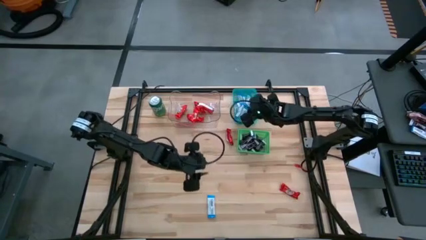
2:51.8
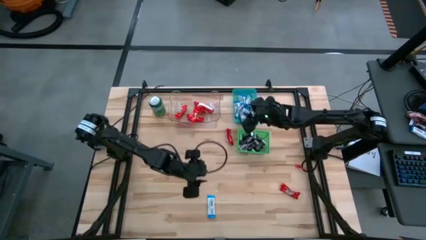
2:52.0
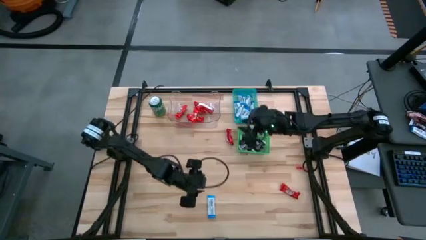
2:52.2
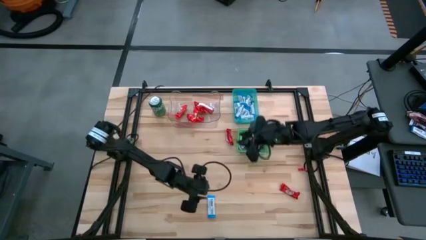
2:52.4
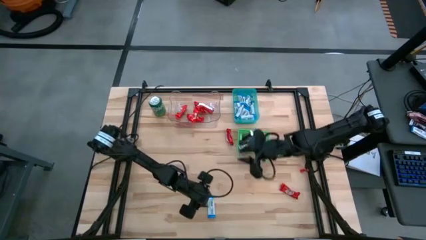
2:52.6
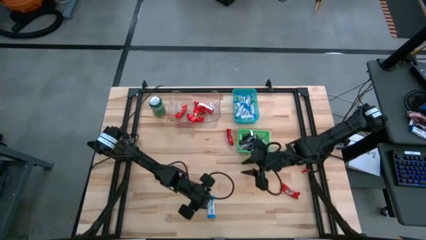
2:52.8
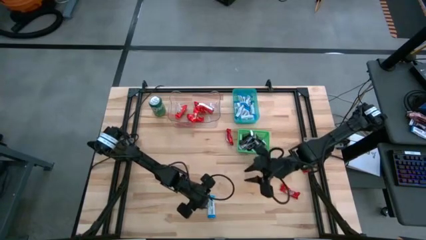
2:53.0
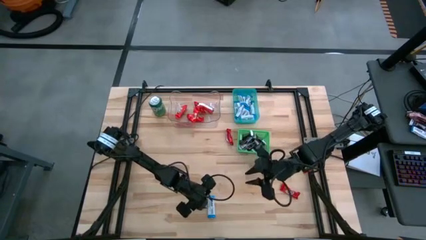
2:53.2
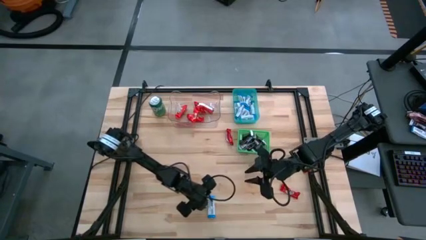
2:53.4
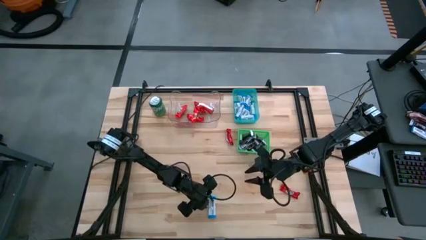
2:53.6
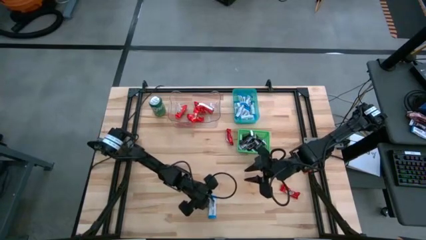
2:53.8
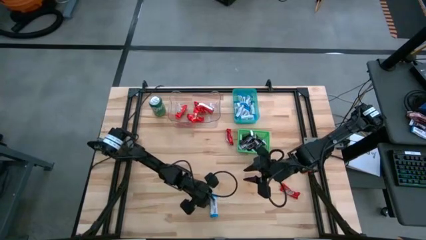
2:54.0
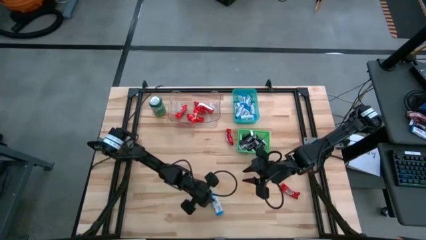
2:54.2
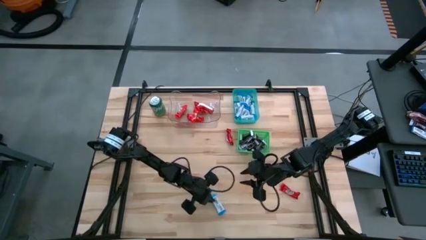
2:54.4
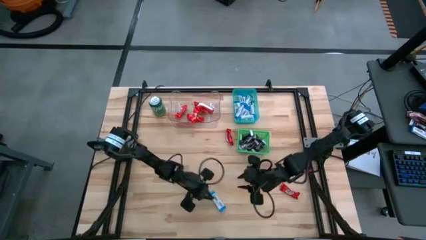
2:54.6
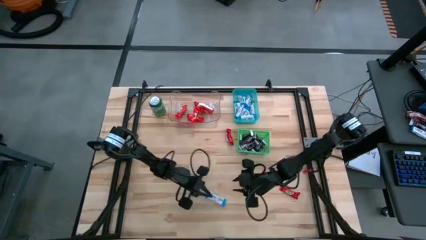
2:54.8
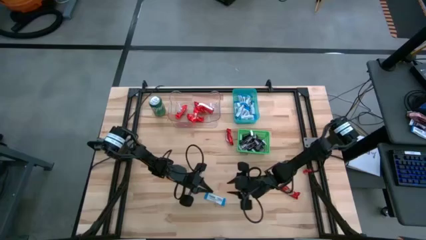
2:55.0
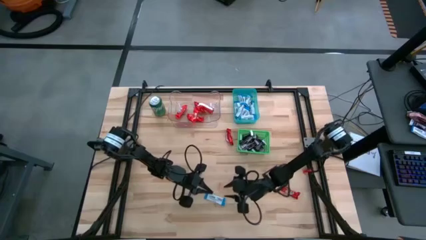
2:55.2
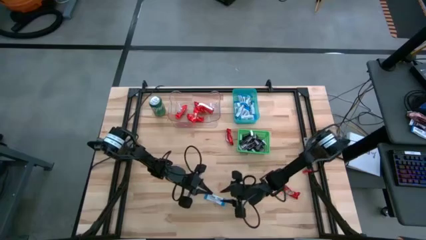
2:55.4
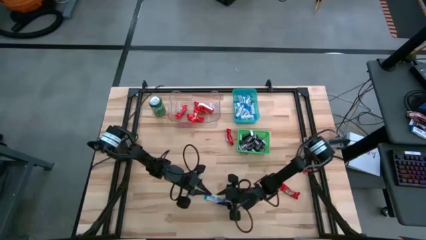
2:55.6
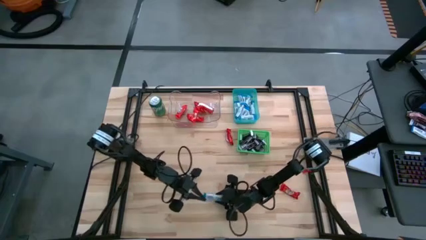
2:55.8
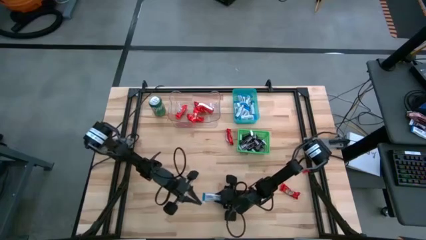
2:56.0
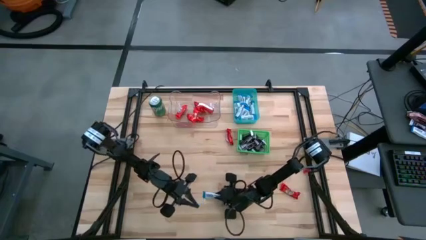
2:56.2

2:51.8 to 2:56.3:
Task: Sort candy
Put the white chocolate bar into the blue bin

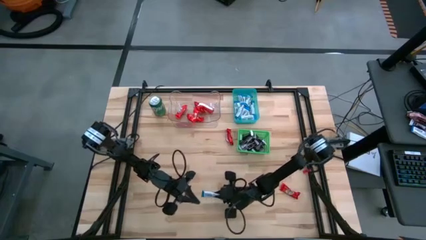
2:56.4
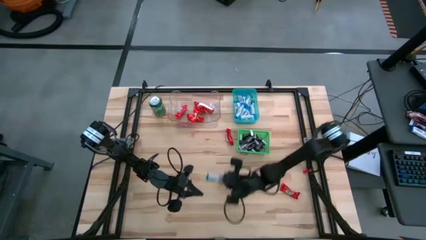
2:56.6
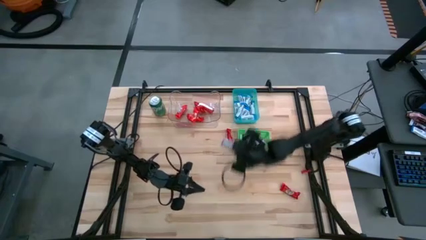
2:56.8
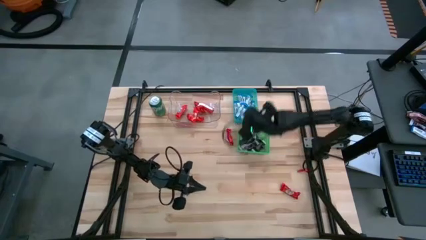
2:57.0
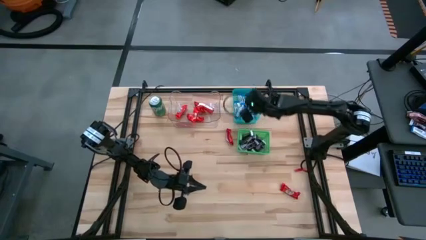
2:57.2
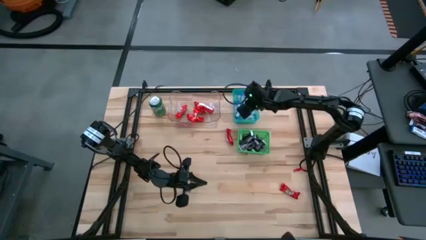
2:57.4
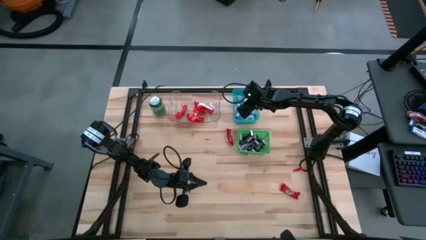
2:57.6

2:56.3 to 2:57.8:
Put the white chocolate bar into the blue bin

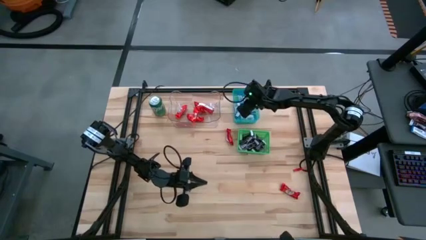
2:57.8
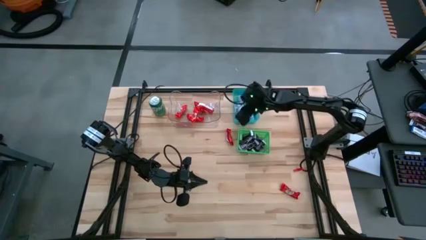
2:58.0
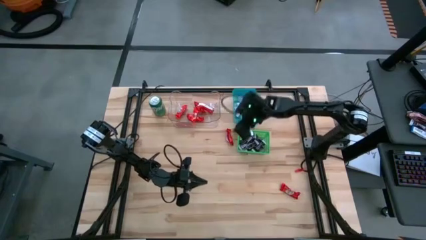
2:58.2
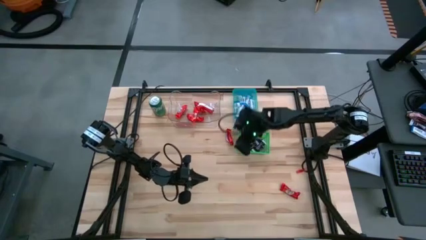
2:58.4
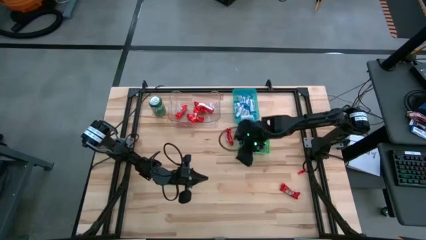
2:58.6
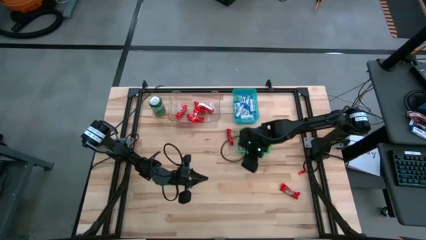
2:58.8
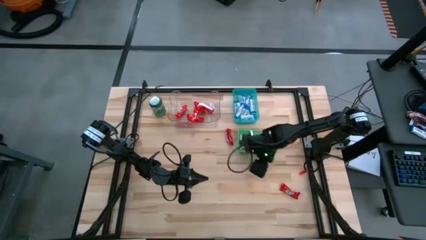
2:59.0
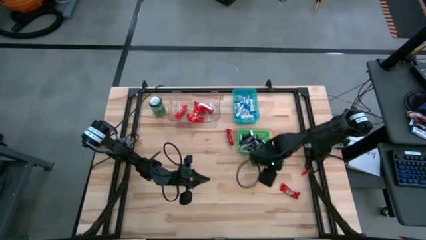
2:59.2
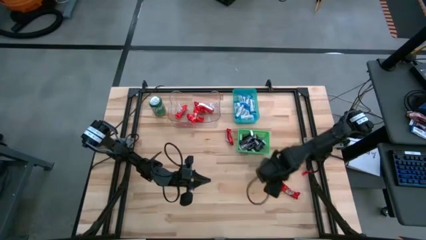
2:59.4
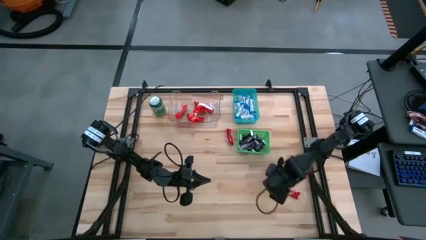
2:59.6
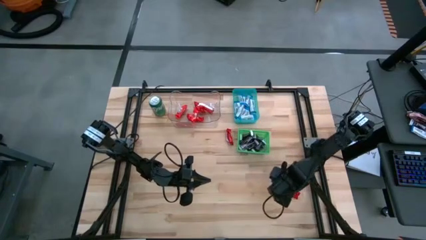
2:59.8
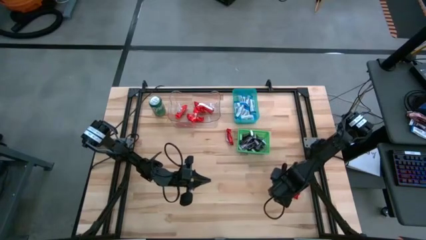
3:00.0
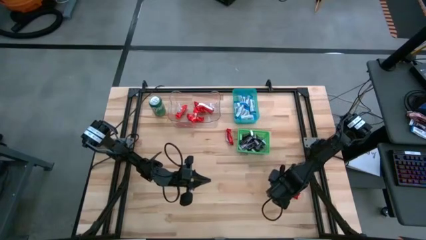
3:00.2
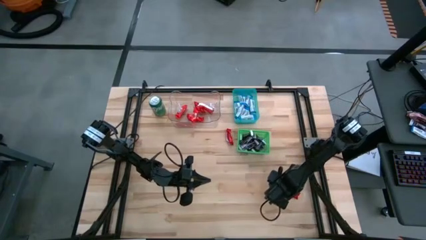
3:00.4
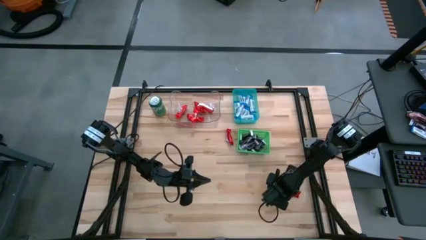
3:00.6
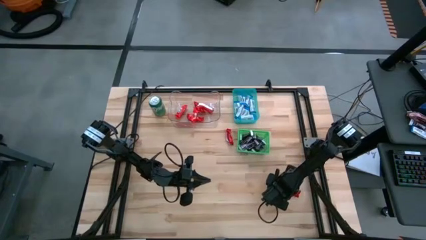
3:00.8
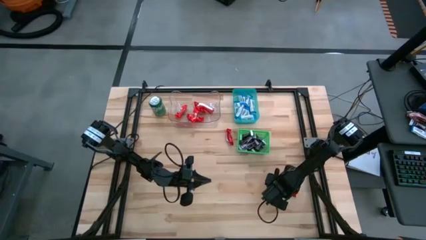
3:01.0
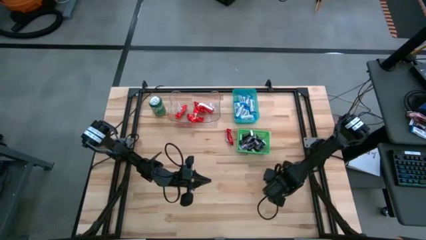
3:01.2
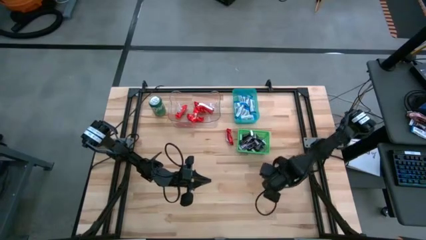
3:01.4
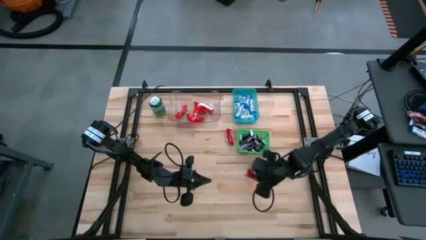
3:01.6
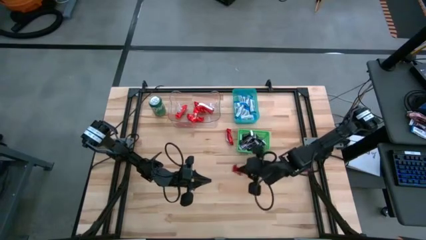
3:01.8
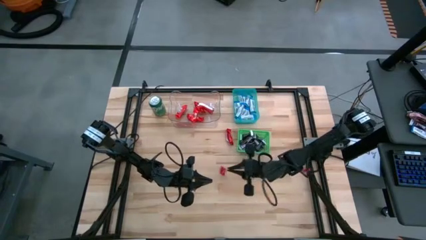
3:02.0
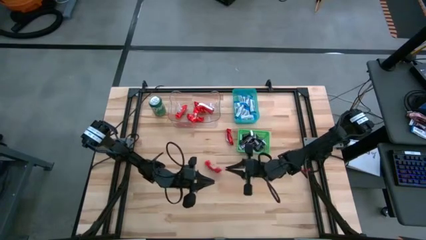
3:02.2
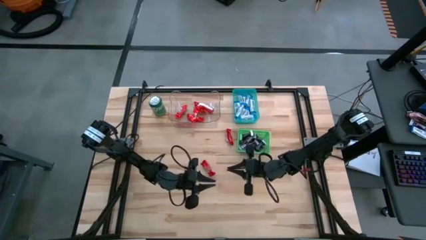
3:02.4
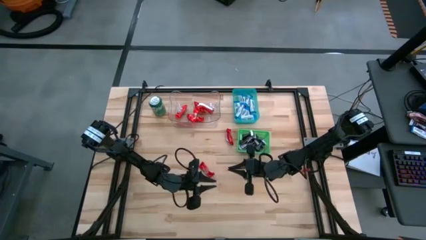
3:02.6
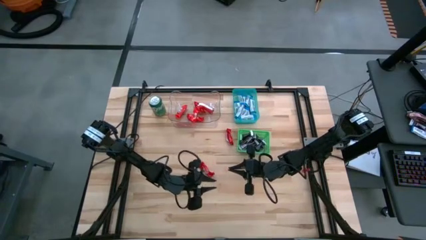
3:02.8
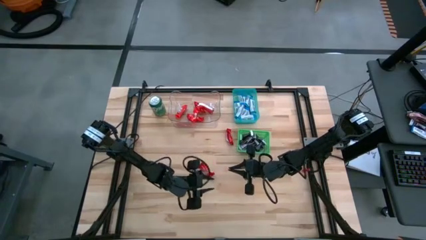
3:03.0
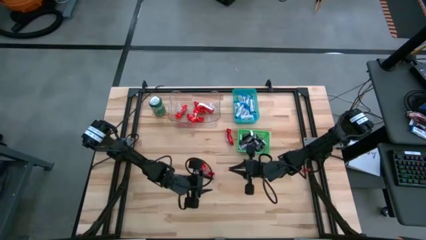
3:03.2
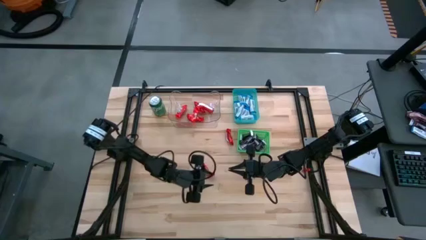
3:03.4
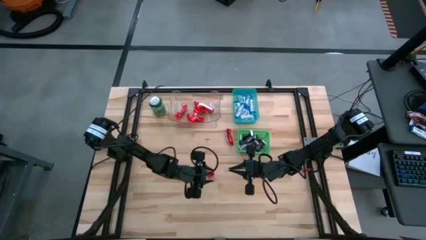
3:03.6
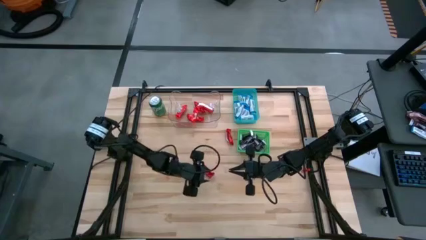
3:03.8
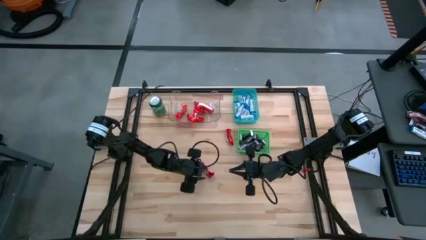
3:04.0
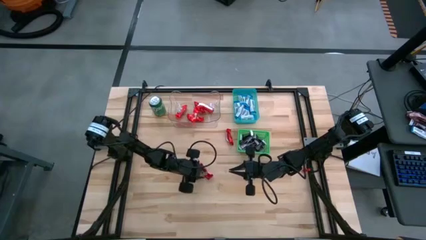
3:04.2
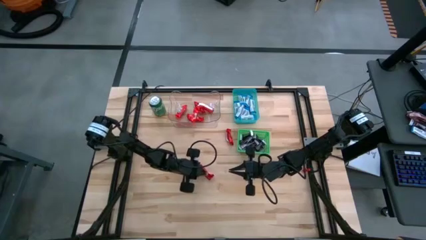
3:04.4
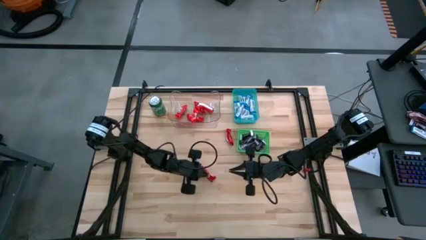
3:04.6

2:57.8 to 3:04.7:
Put the red chocolate bar into the transparent bin

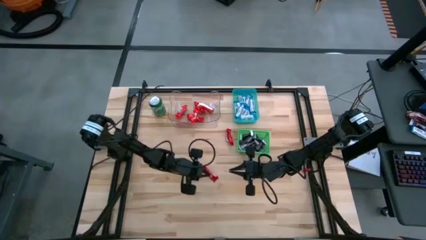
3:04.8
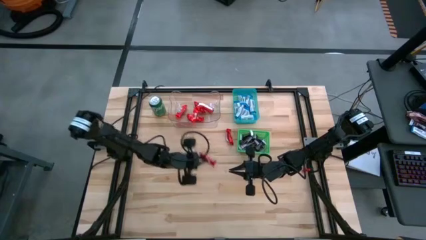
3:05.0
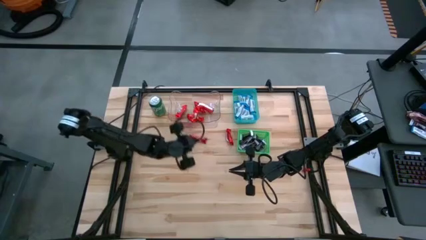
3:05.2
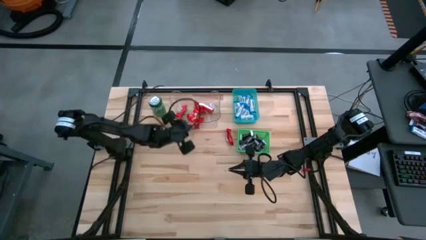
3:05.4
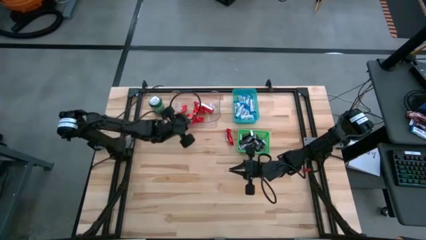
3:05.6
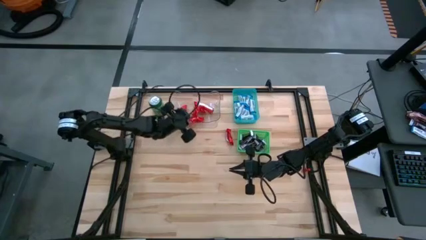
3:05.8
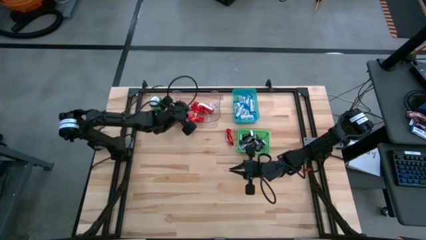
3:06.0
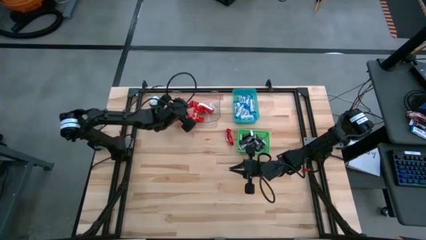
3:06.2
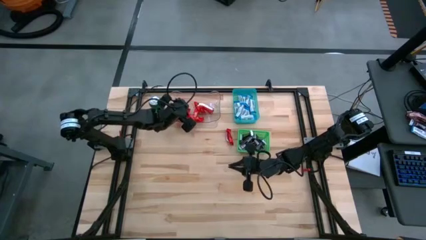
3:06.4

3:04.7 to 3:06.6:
Put the red chocolate bar into the transparent bin

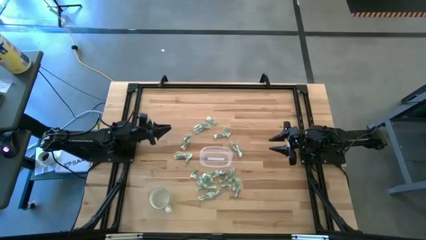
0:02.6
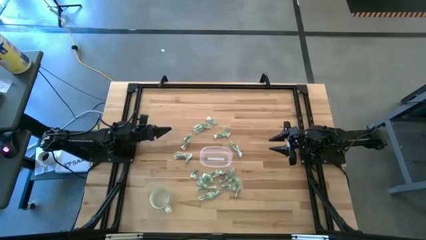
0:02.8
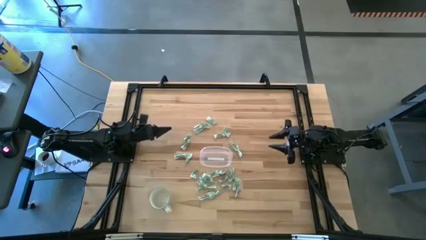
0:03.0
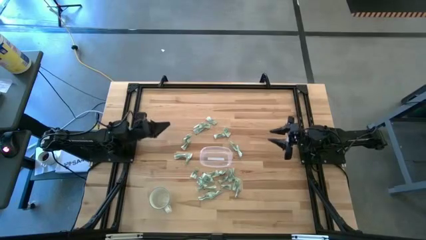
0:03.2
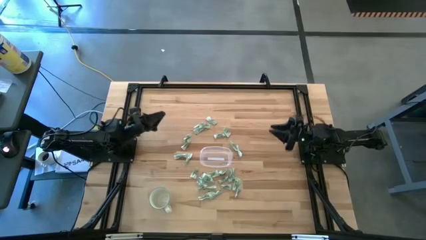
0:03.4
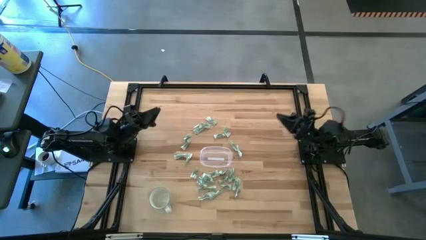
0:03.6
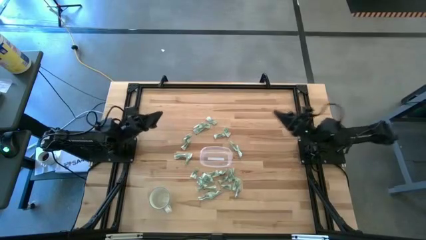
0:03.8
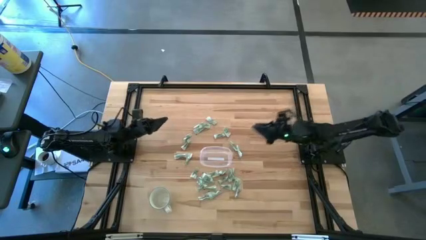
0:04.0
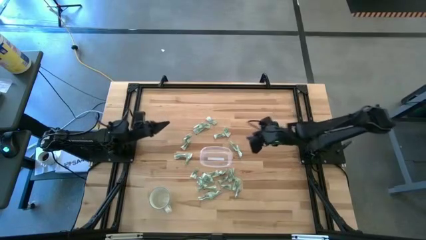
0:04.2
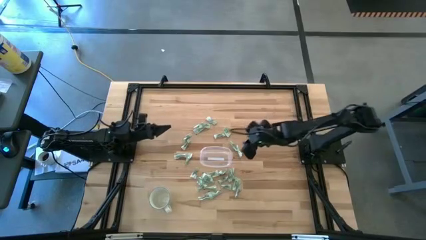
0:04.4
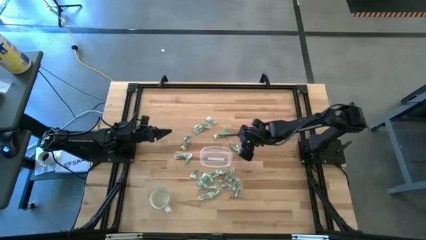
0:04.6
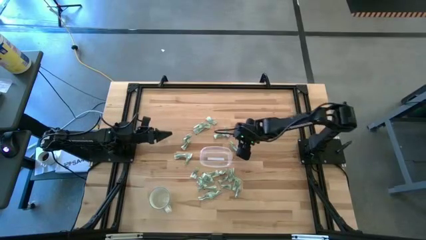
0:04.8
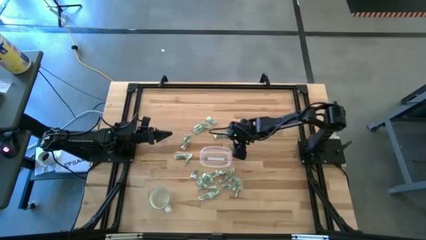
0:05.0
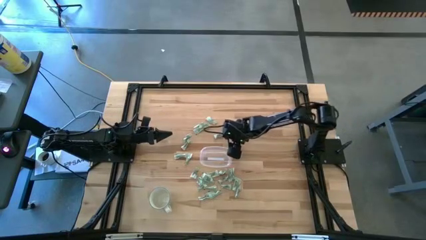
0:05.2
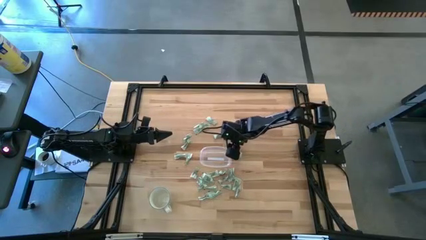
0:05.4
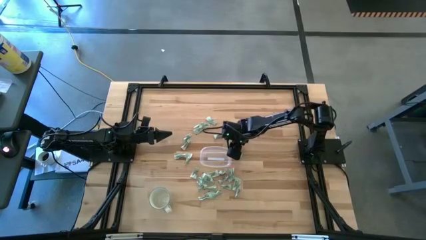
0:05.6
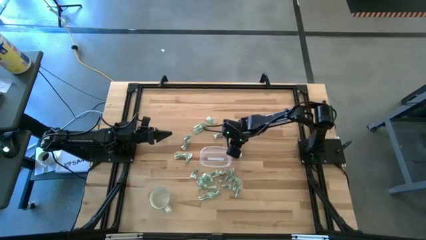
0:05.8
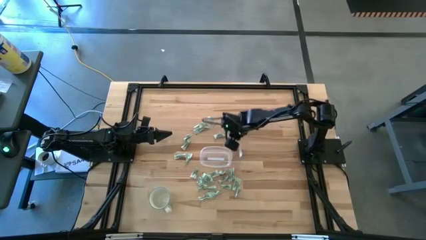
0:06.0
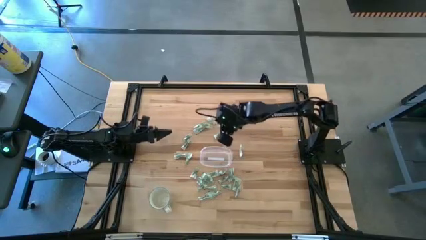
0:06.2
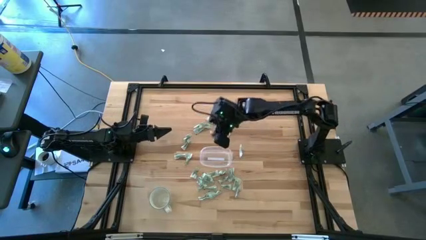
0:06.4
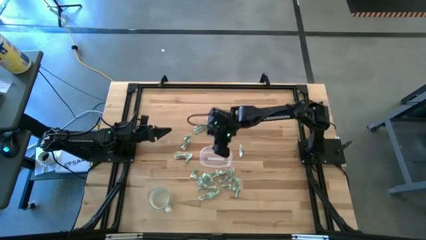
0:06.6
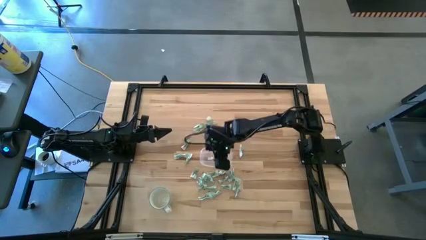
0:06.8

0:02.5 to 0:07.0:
Task: Pick and place Stevia / Truvia into bins
Put the stevia packet into the transparent container
